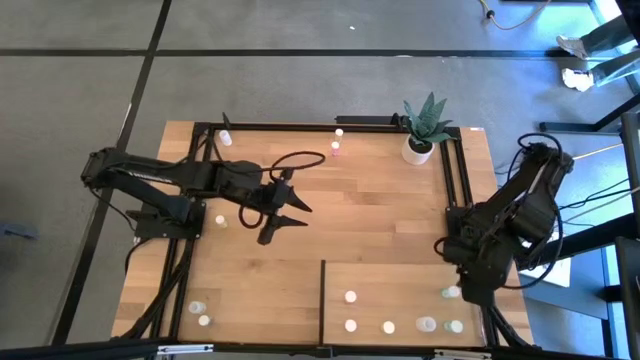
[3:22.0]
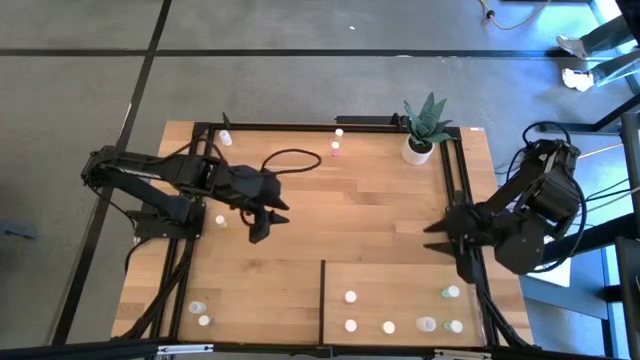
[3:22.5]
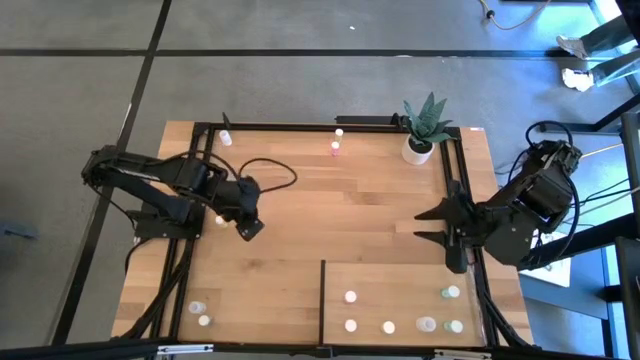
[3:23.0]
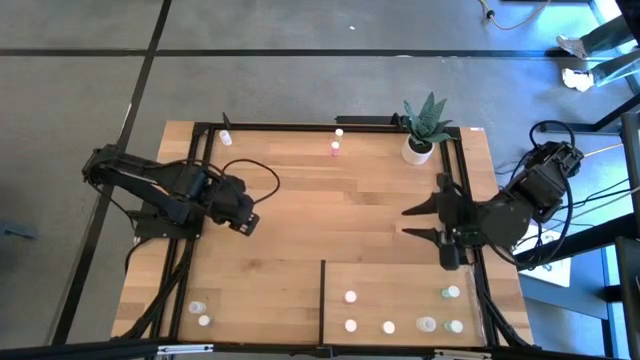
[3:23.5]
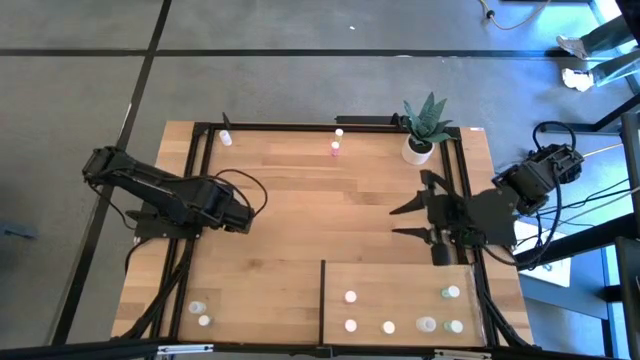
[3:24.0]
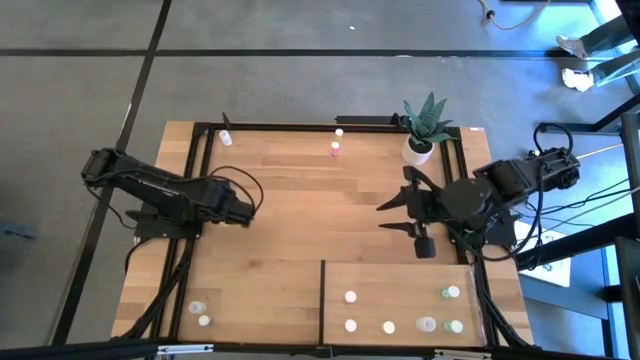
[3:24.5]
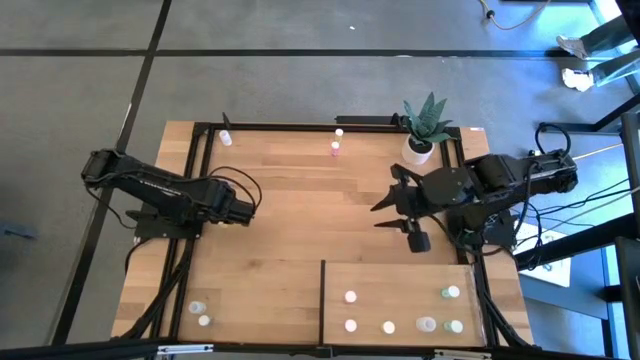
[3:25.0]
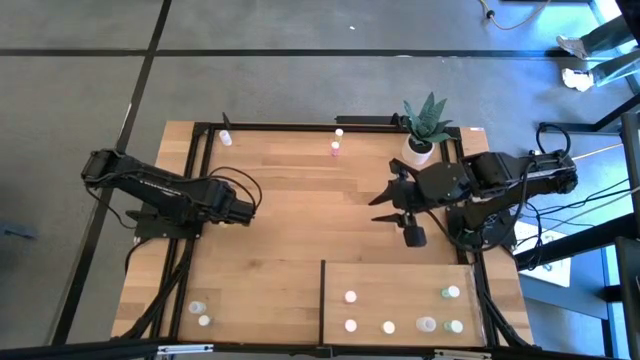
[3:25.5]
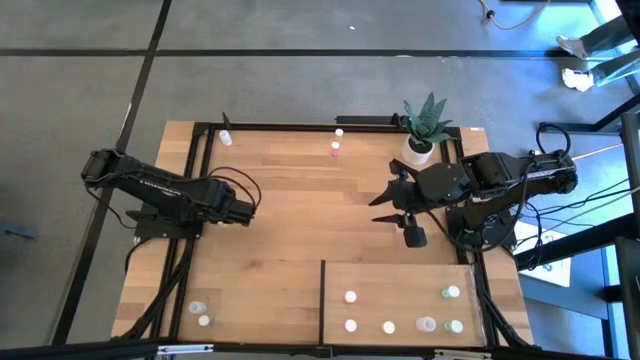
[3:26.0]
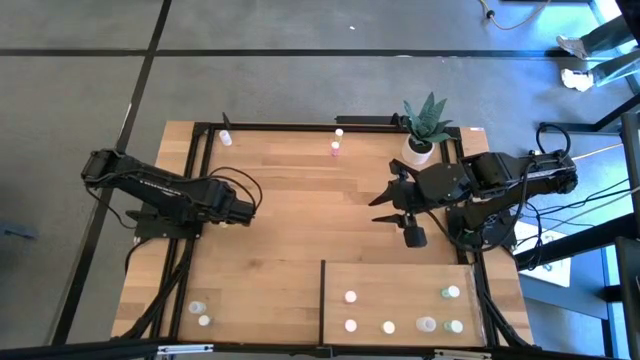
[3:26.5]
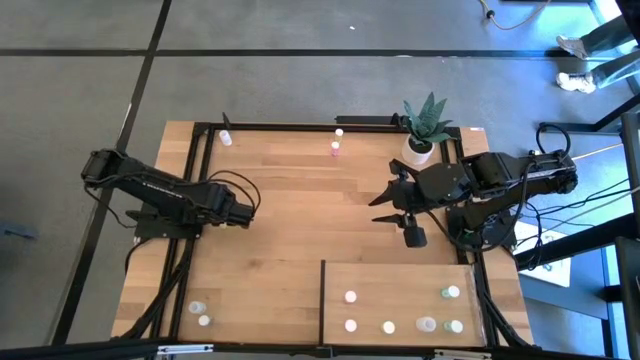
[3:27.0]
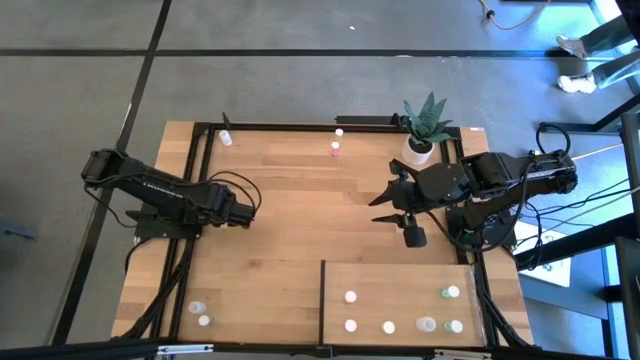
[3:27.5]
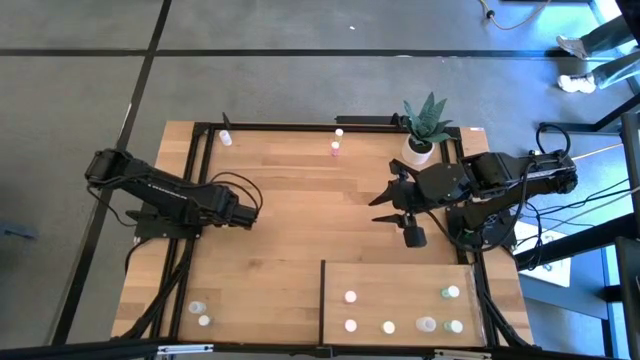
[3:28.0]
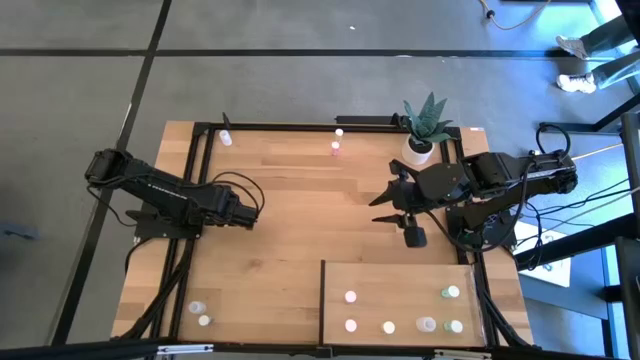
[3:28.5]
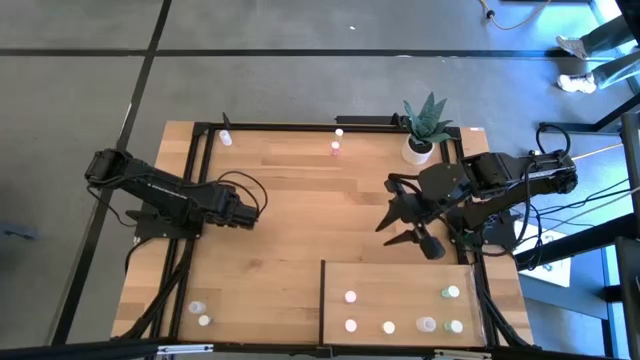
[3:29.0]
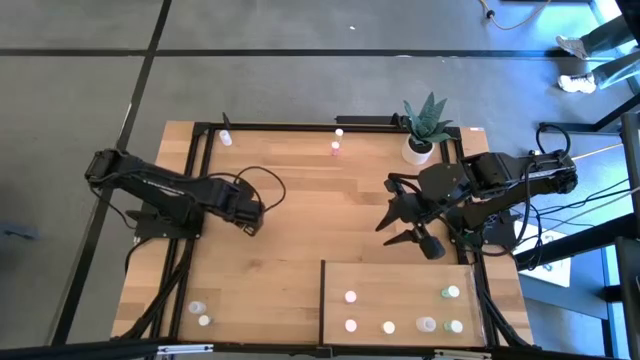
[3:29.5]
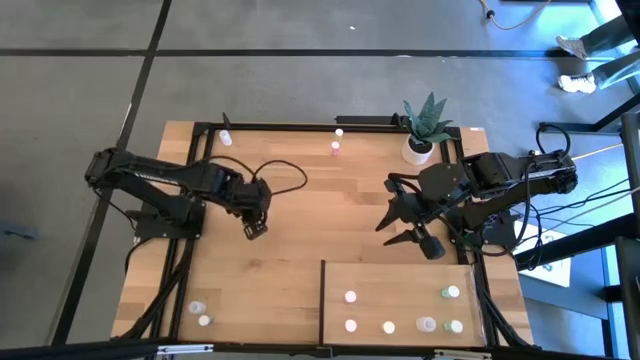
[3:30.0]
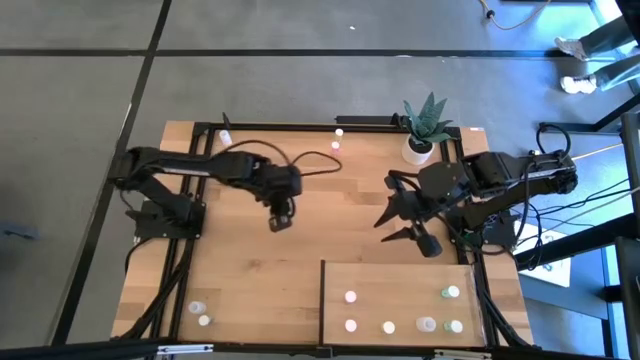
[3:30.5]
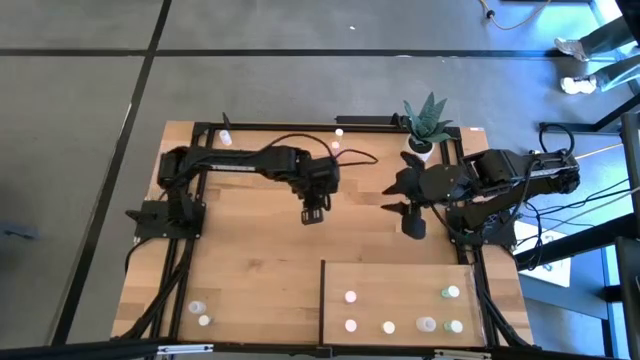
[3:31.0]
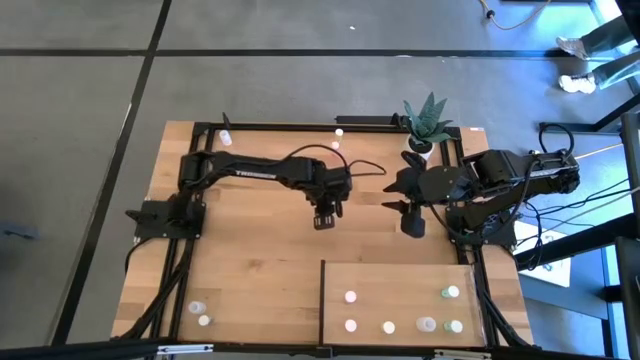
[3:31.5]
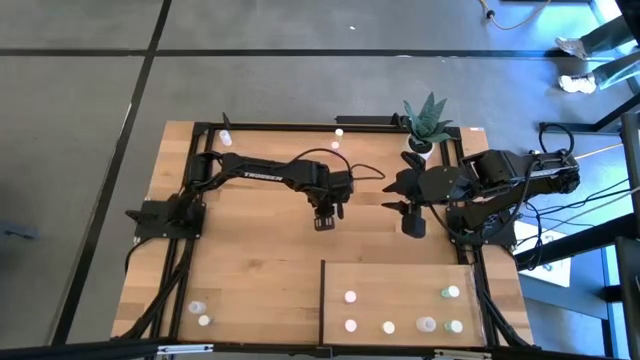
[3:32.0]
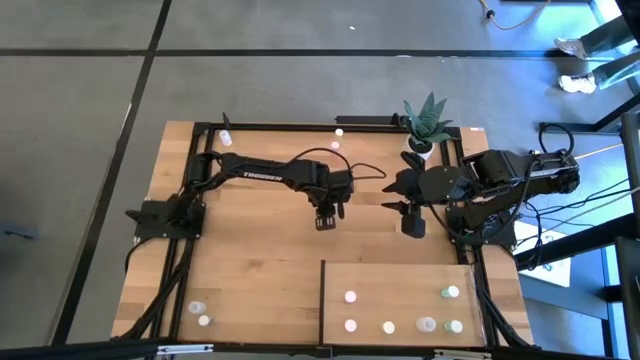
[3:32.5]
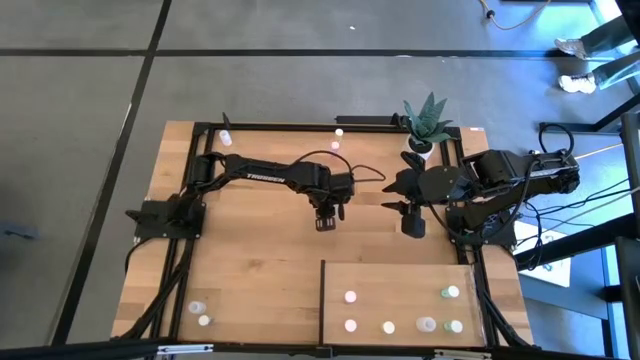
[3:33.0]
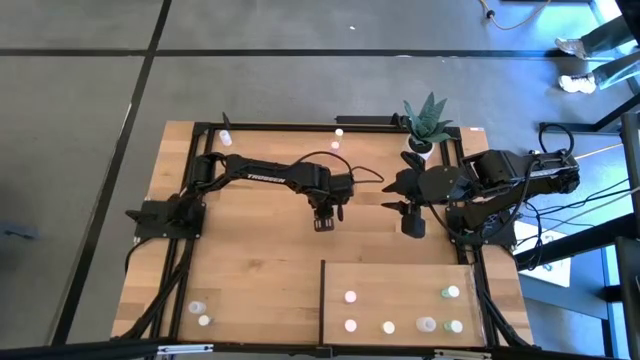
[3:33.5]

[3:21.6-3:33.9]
Task: Pick and place medicine bottles onto shelf by color
Put the bottom yellow pill bottle on the shelf aligned with the other yellow pill bottle

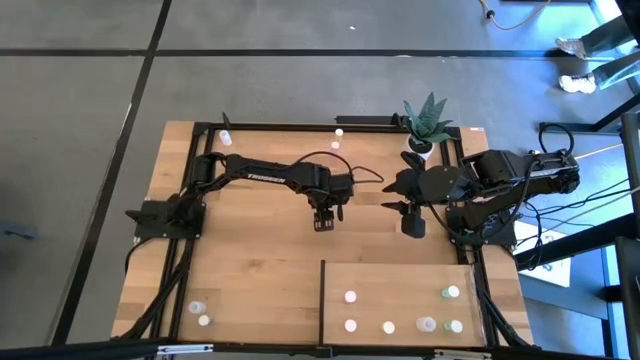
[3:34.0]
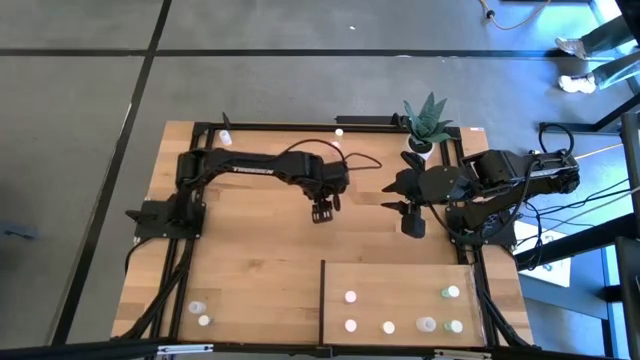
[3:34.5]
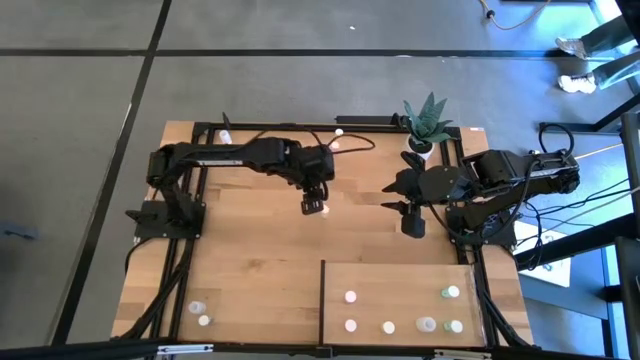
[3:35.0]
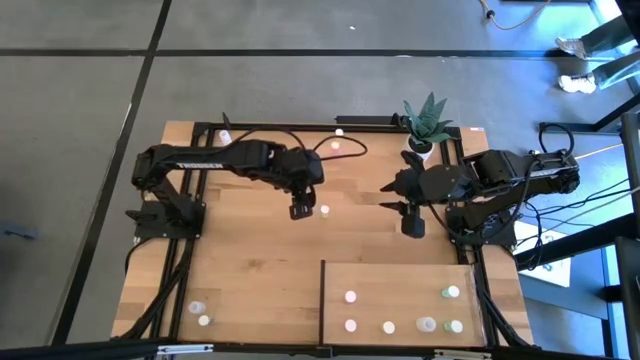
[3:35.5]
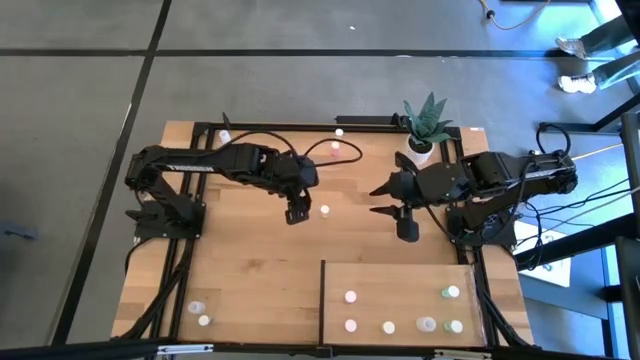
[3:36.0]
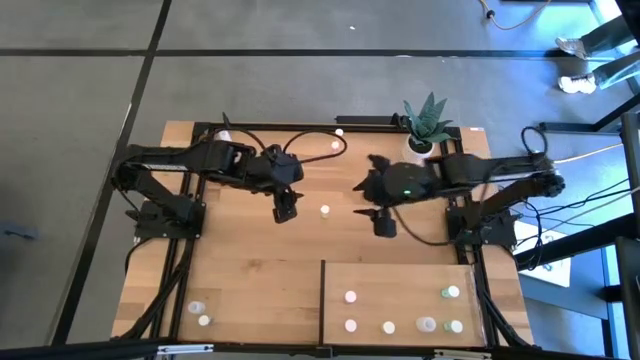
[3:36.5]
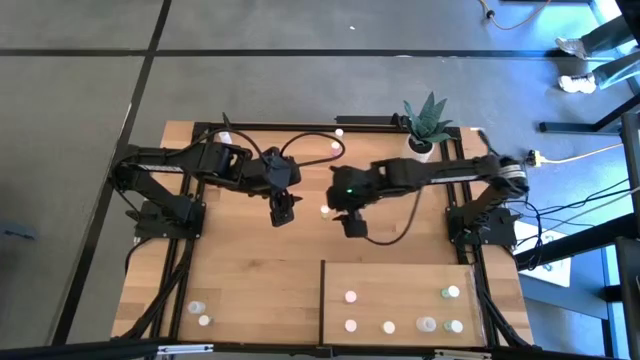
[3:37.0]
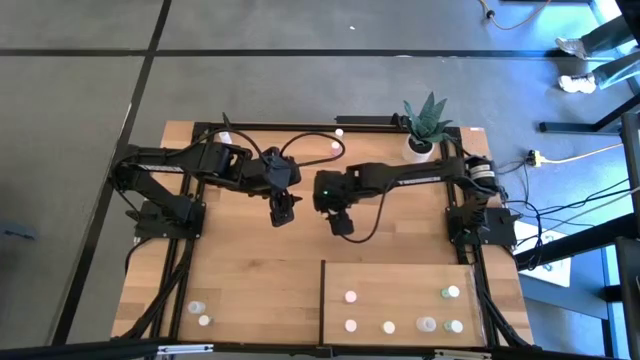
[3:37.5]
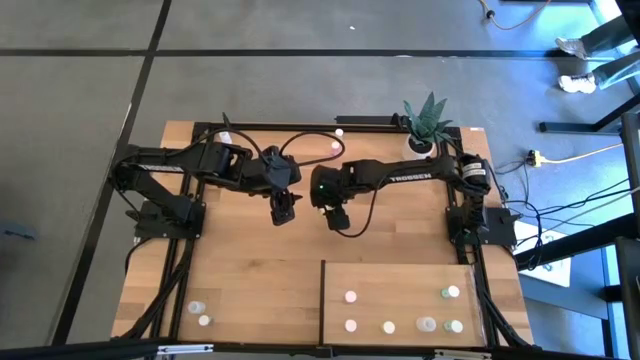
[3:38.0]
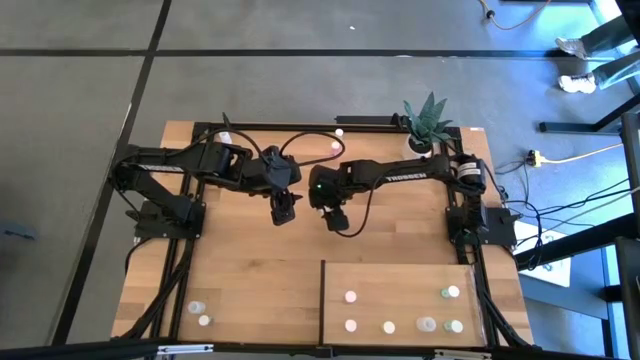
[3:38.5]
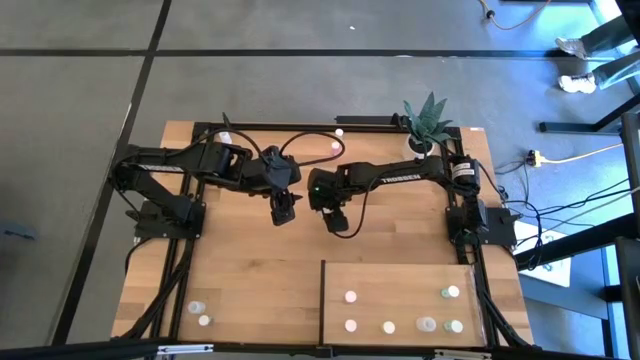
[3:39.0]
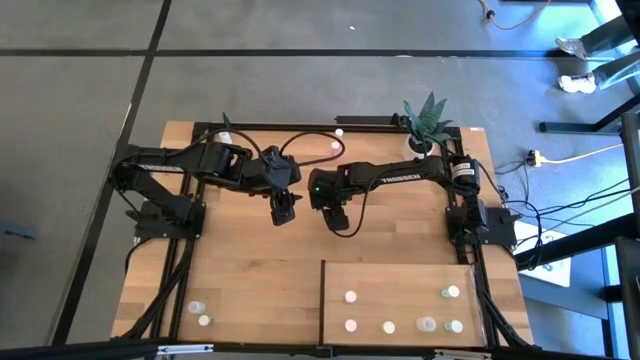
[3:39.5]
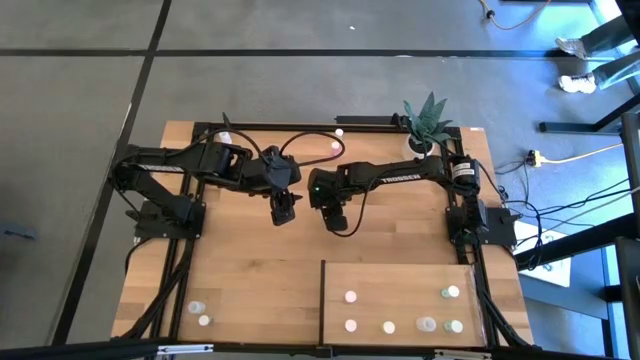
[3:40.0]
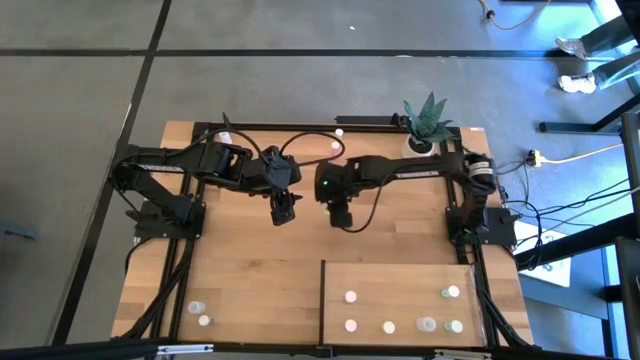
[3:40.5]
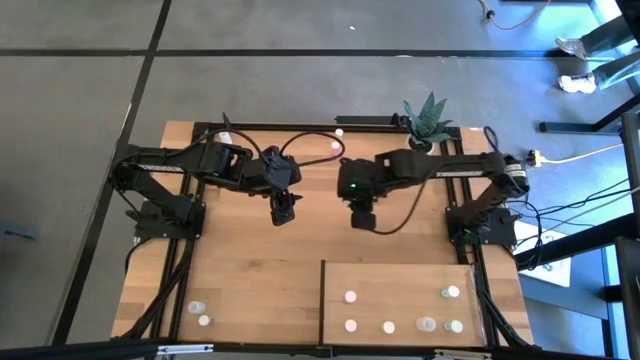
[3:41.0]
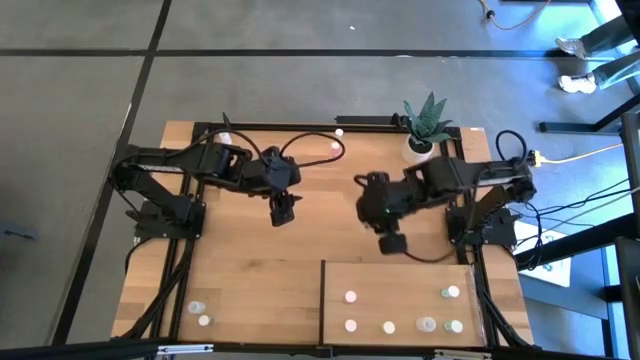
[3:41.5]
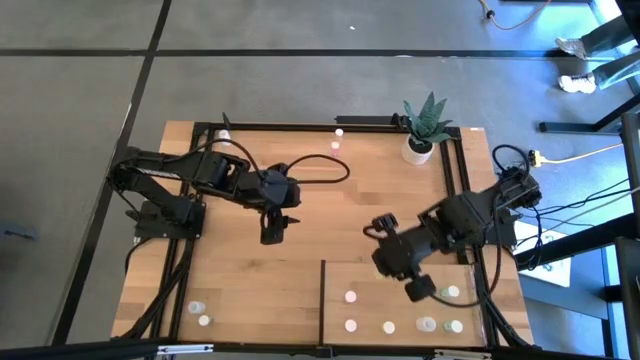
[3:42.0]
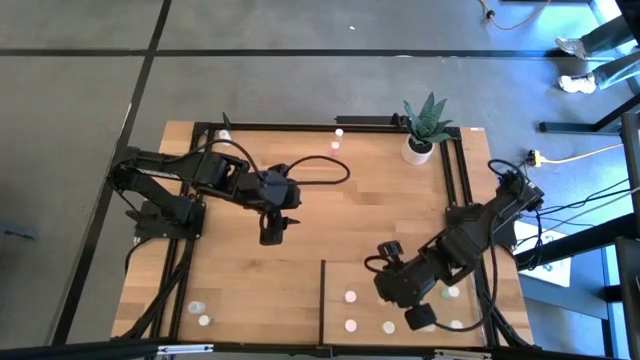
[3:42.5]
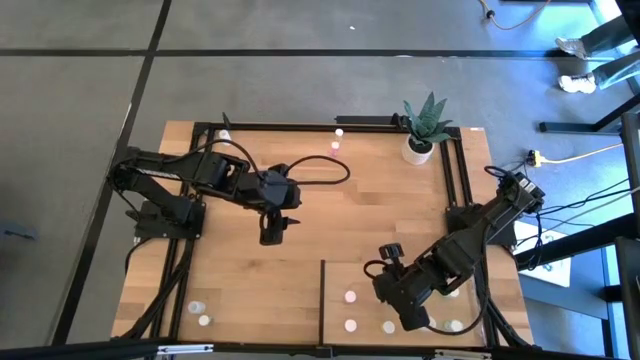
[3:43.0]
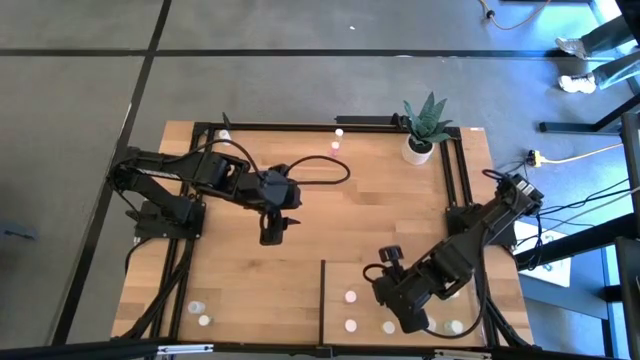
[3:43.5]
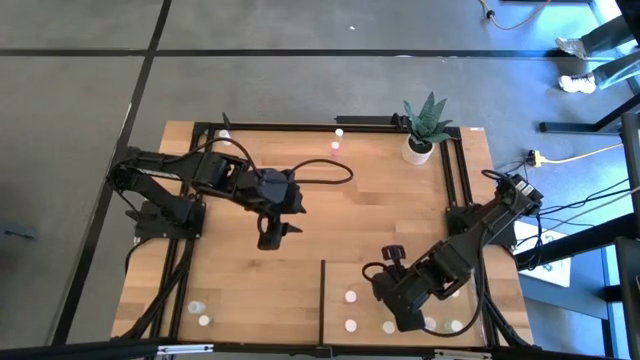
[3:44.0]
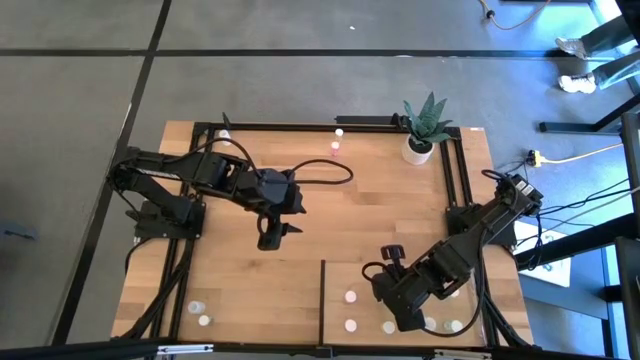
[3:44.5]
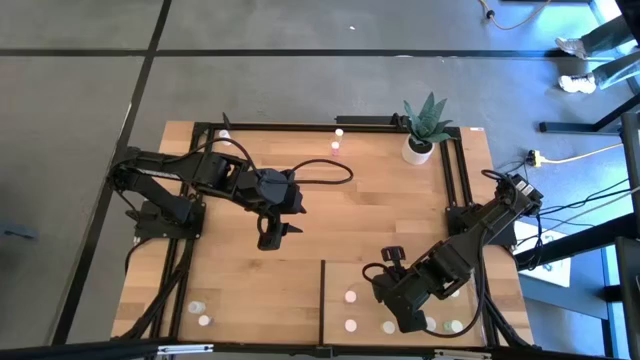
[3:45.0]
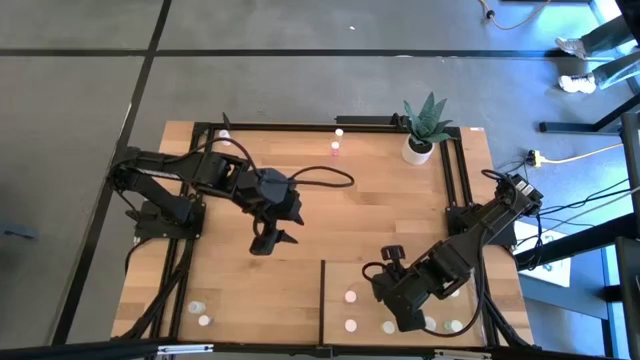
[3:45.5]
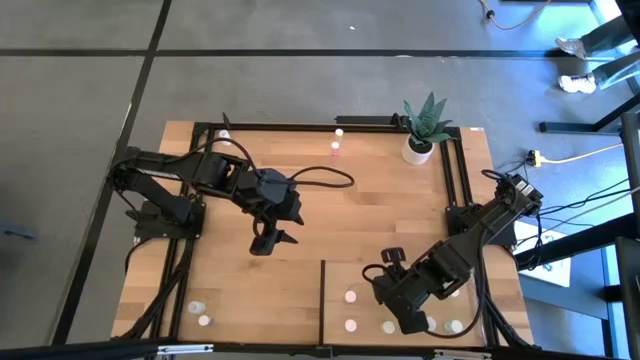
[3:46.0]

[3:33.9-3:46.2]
Put the bottom yellow pill bottle on the shelf aligned with the other yellow pill bottle
